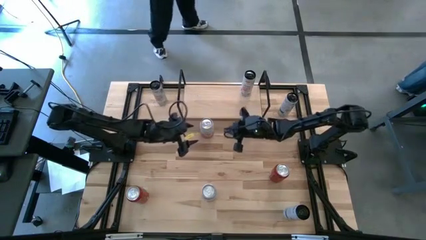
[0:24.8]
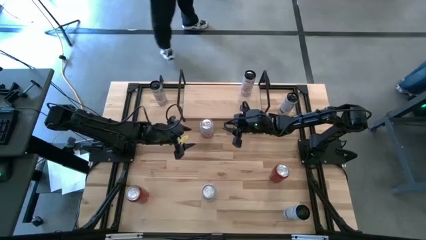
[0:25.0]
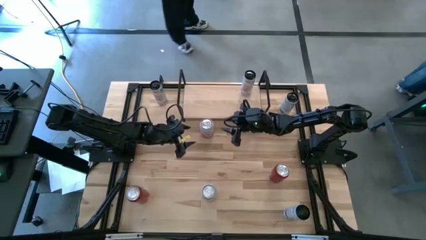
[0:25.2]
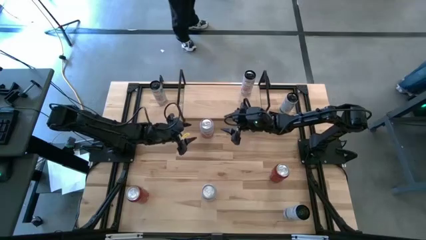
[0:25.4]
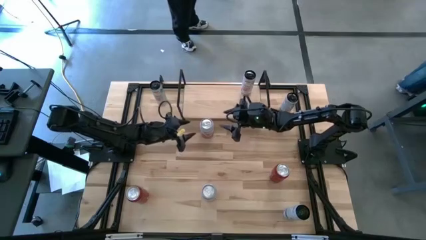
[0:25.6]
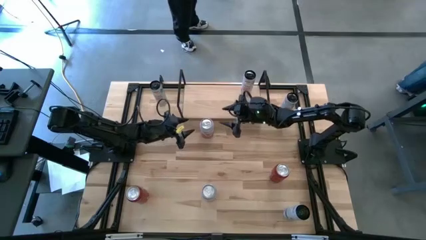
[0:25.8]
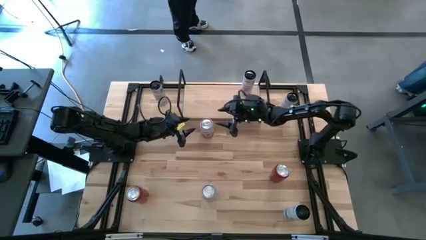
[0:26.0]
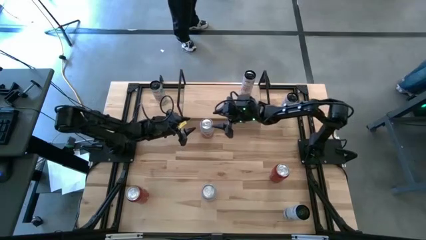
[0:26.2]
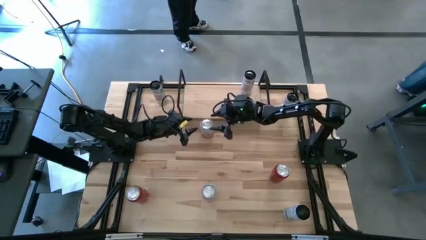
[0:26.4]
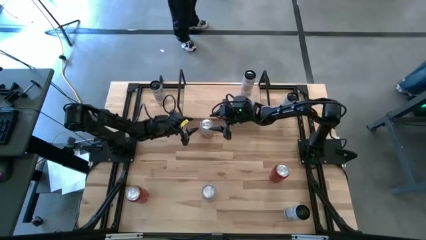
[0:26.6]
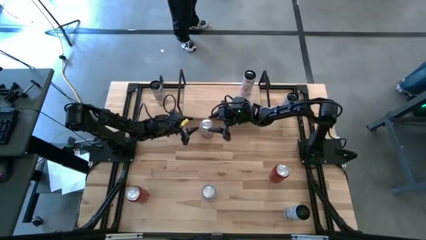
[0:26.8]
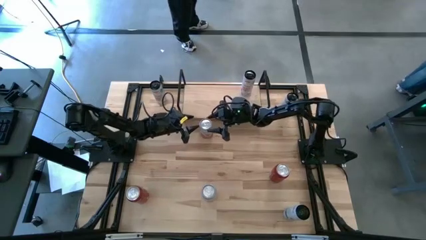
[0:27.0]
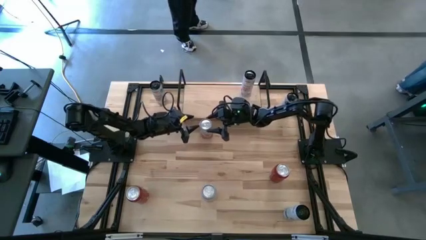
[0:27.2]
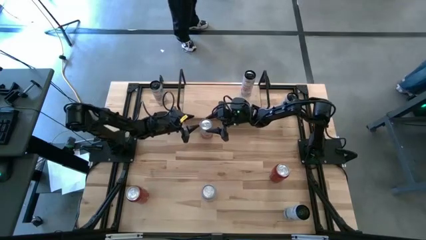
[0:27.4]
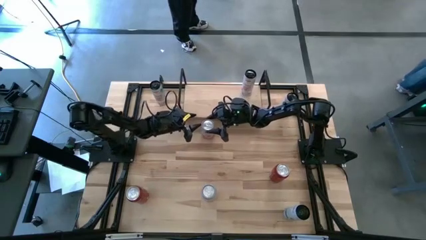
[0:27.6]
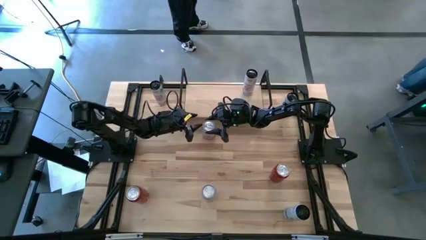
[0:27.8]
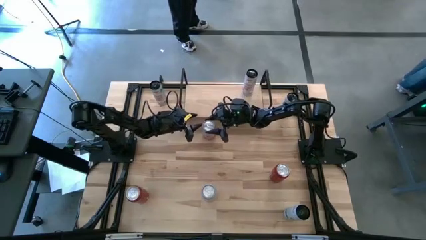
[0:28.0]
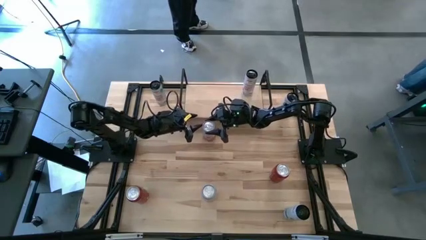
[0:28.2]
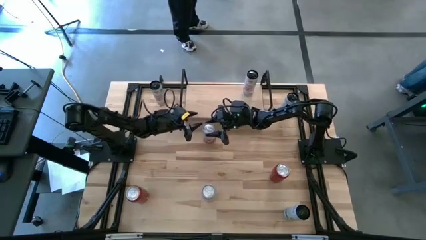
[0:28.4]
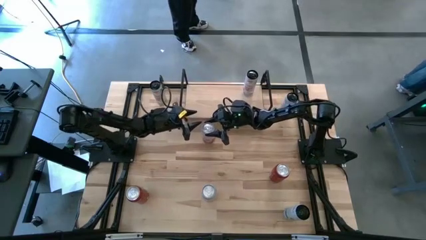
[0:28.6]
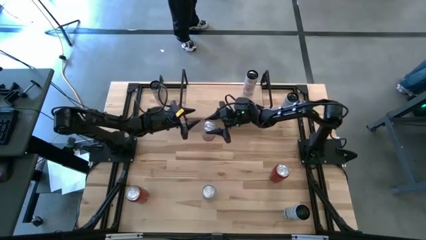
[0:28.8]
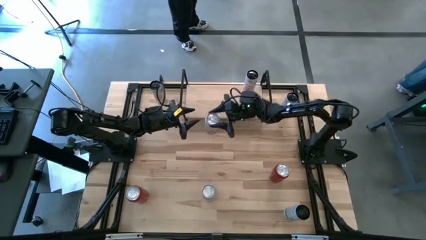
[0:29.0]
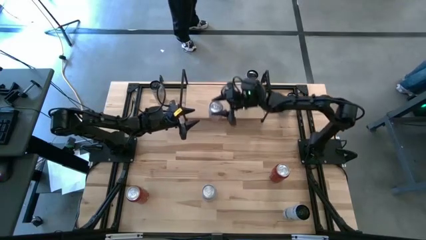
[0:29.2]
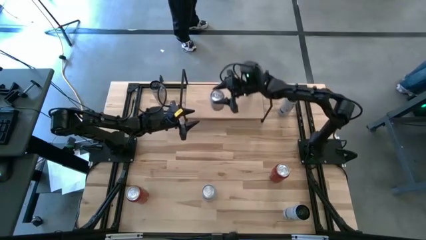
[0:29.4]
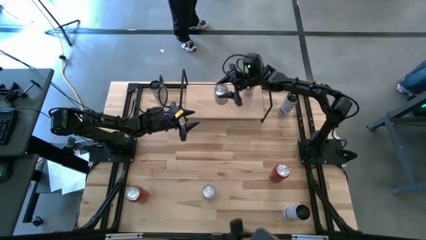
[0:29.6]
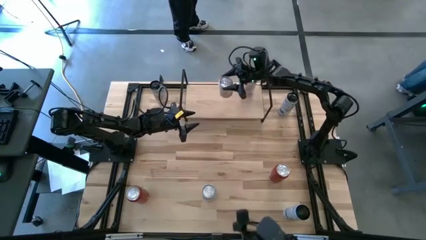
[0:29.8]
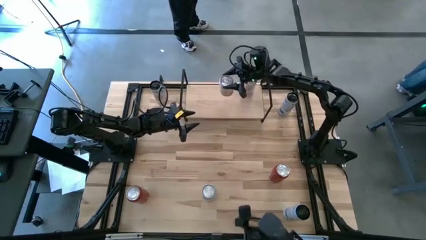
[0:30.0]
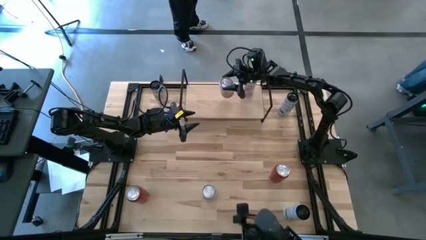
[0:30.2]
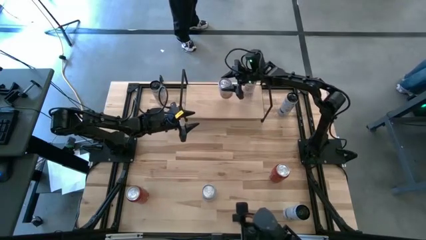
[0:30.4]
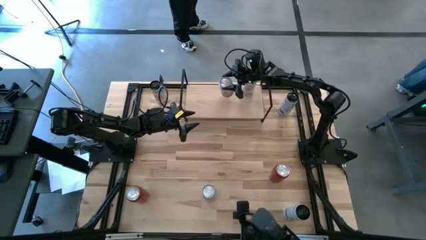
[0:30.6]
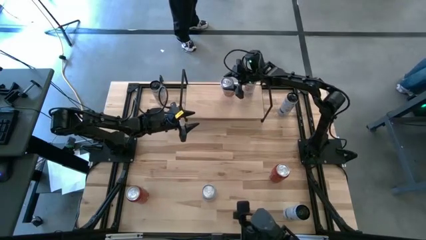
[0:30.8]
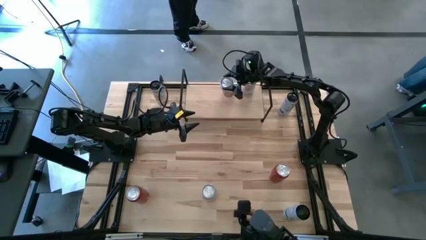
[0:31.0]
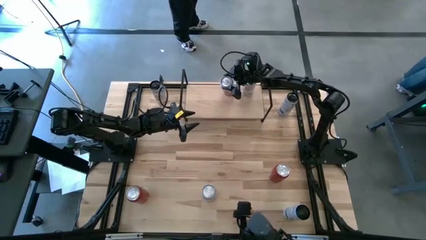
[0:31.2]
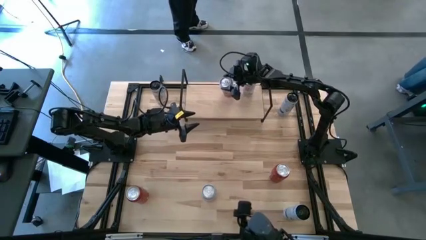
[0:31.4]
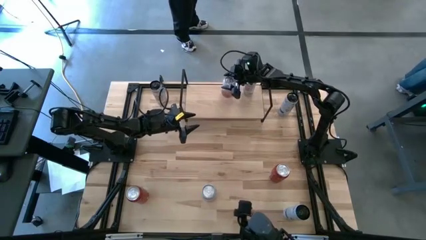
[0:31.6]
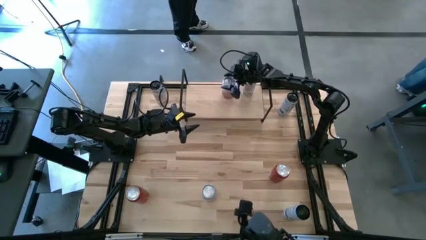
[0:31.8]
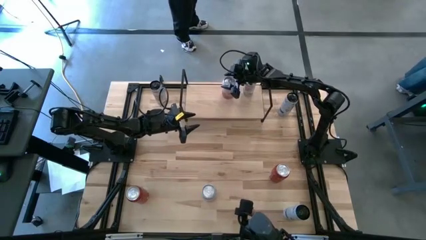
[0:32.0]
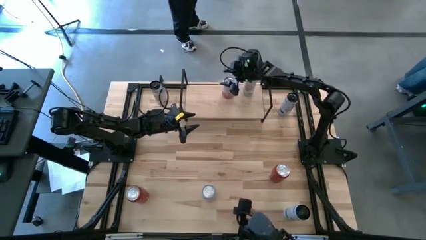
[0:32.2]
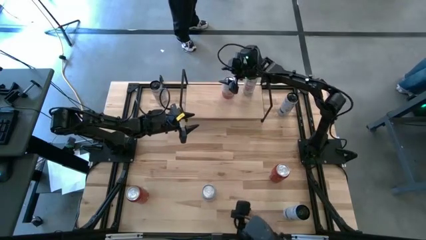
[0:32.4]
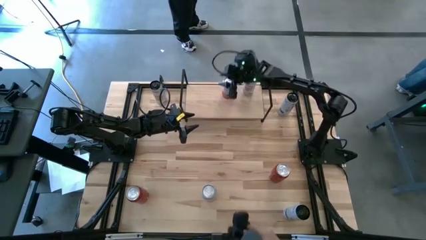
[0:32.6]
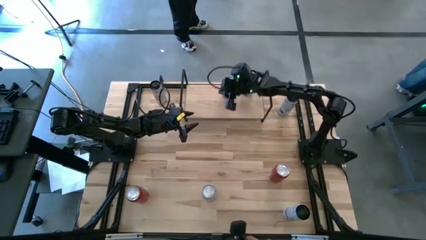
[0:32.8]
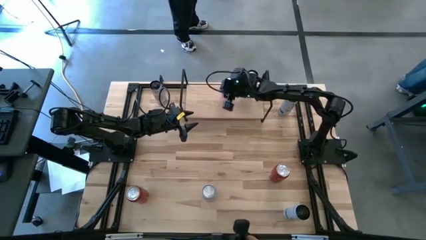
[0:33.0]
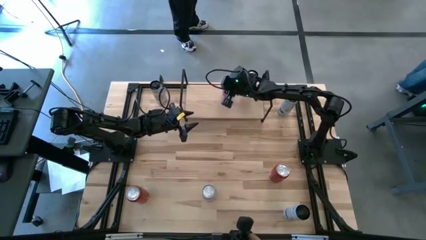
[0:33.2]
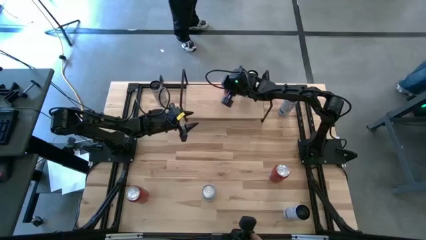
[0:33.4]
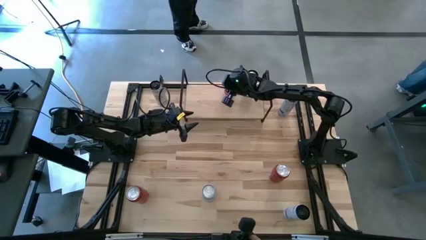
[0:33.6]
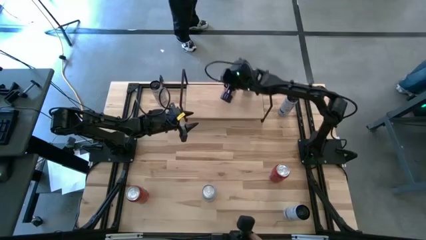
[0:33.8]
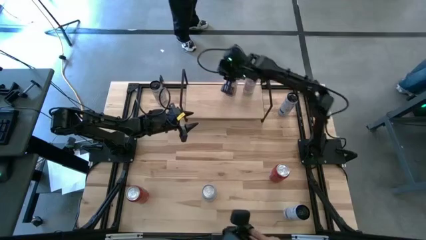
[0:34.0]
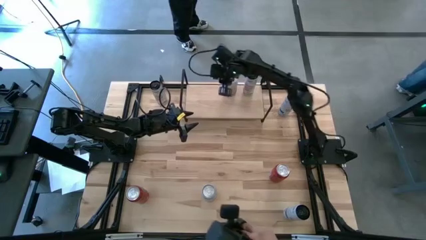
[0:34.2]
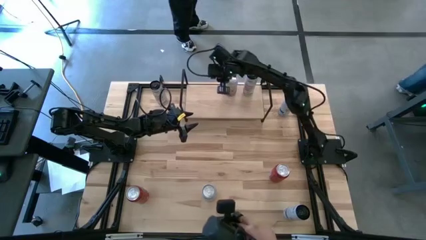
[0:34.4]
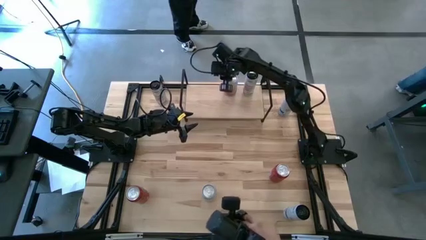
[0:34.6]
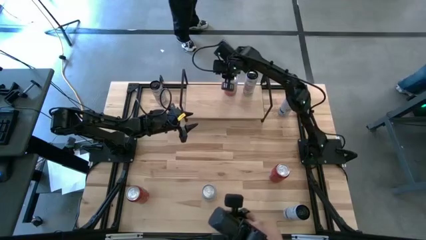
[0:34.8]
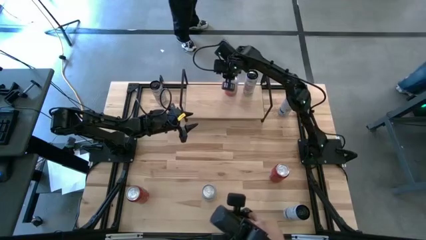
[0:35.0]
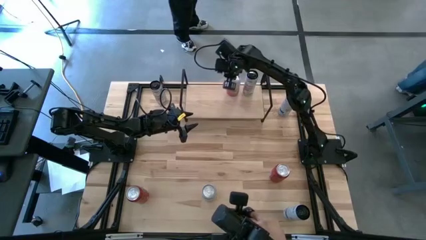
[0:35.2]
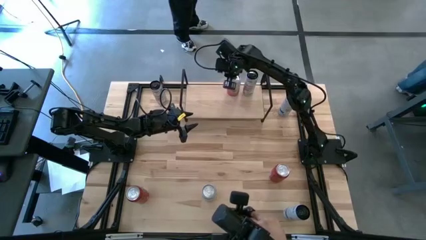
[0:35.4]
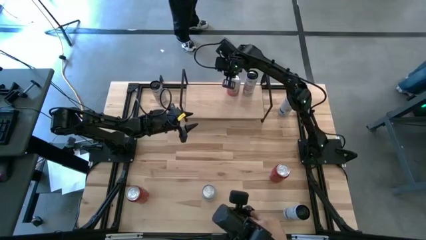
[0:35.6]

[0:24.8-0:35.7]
Task: Place canned beverage on shelf
Put the top pink and white soda can on the shelf

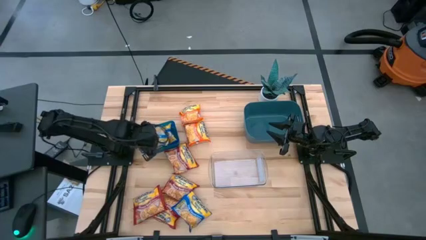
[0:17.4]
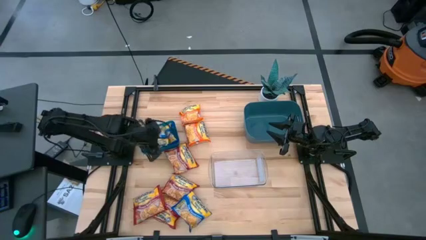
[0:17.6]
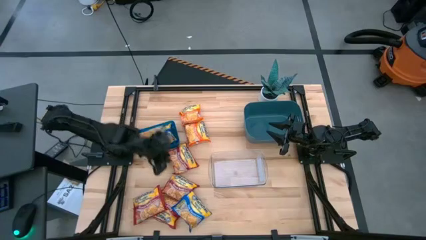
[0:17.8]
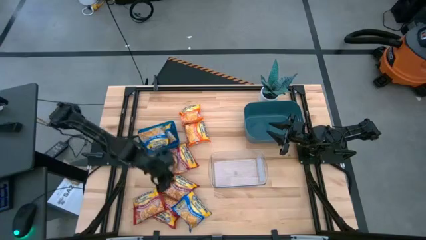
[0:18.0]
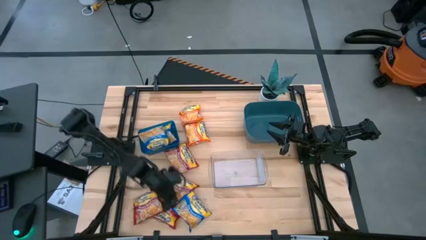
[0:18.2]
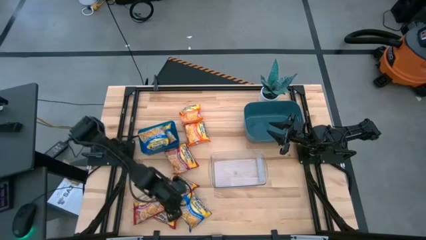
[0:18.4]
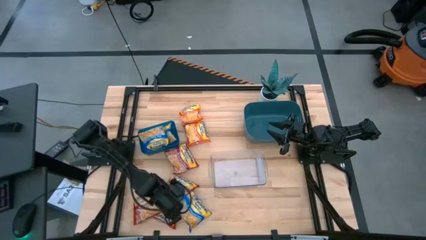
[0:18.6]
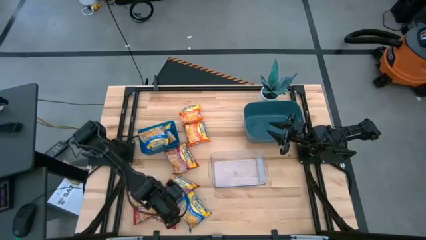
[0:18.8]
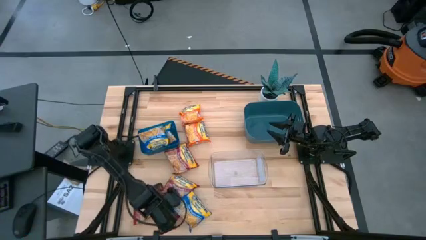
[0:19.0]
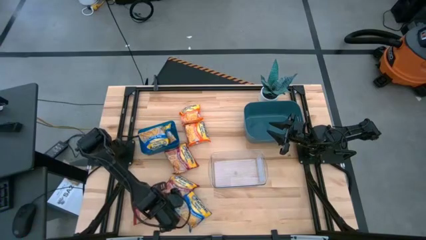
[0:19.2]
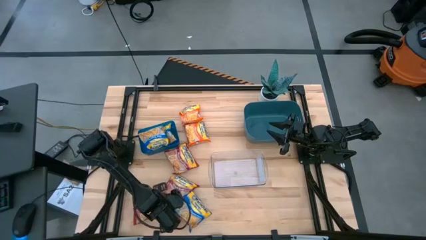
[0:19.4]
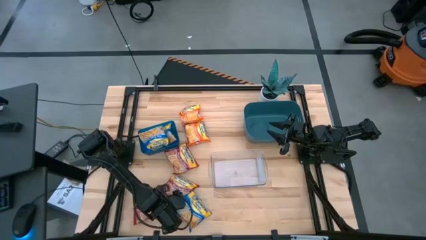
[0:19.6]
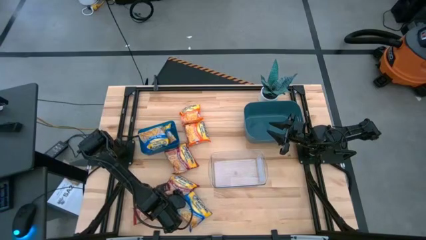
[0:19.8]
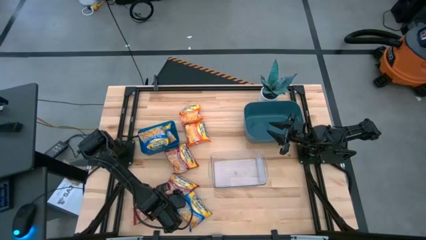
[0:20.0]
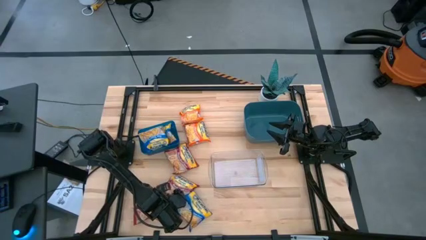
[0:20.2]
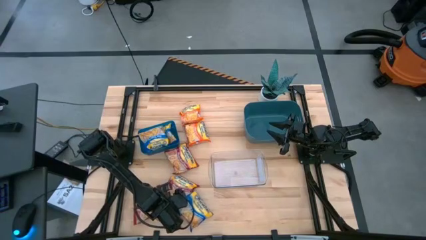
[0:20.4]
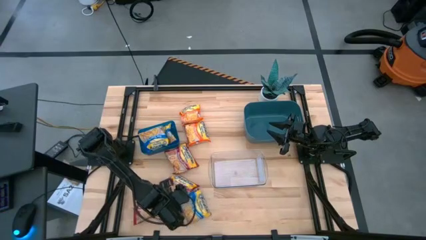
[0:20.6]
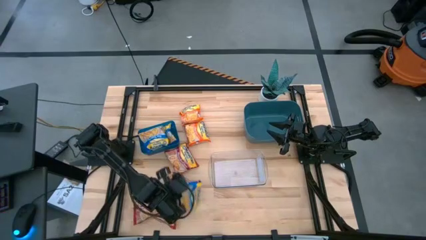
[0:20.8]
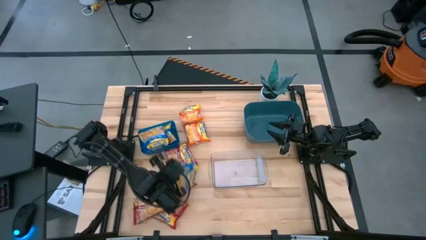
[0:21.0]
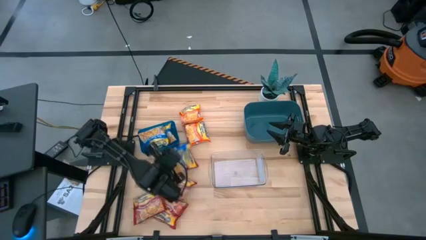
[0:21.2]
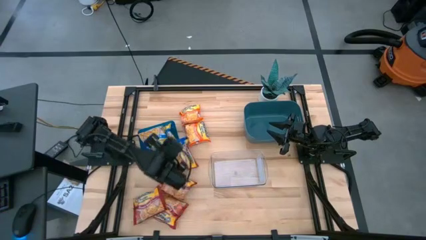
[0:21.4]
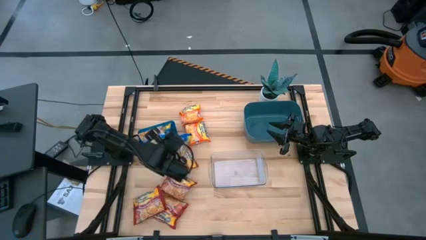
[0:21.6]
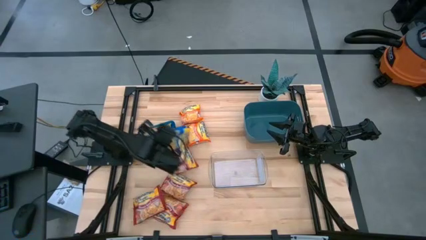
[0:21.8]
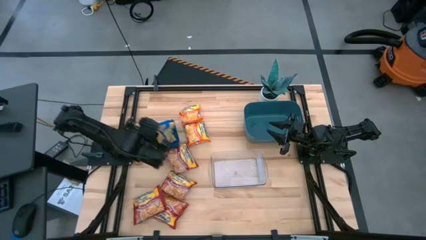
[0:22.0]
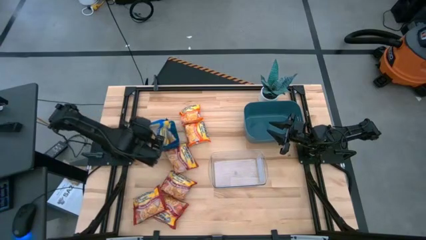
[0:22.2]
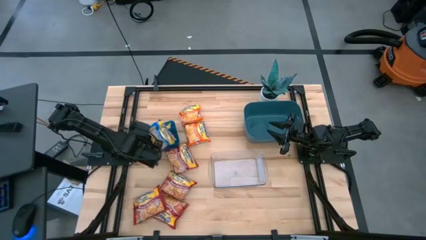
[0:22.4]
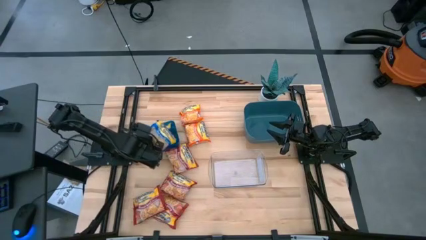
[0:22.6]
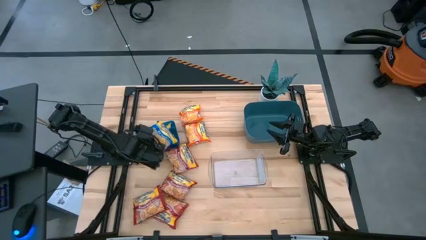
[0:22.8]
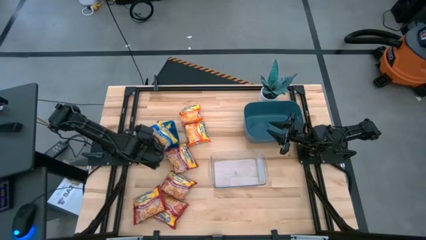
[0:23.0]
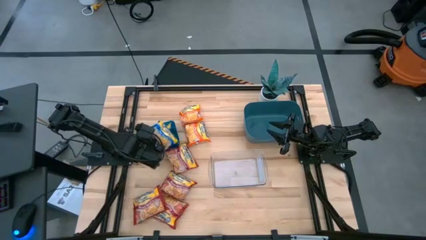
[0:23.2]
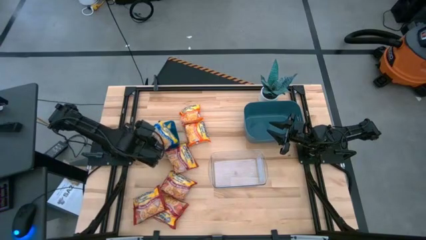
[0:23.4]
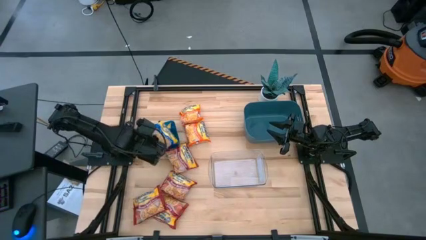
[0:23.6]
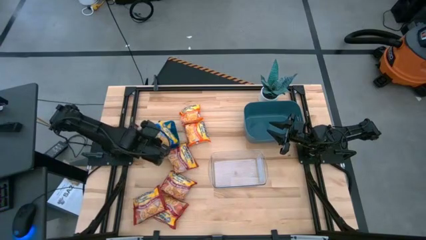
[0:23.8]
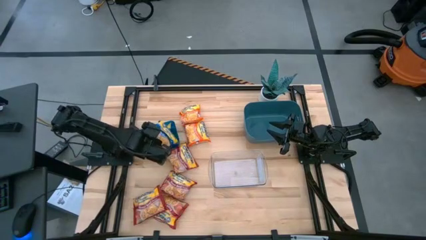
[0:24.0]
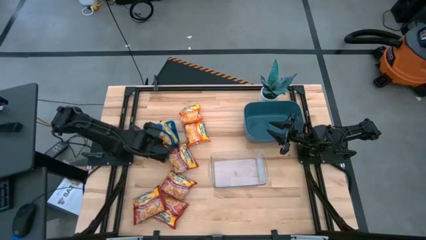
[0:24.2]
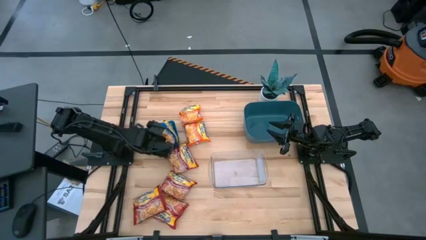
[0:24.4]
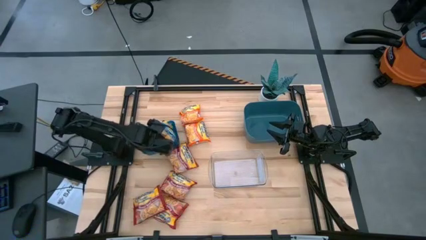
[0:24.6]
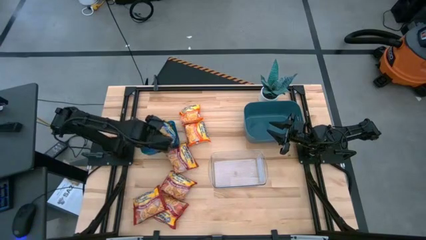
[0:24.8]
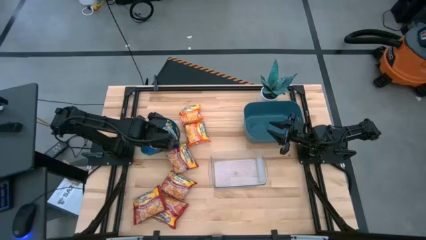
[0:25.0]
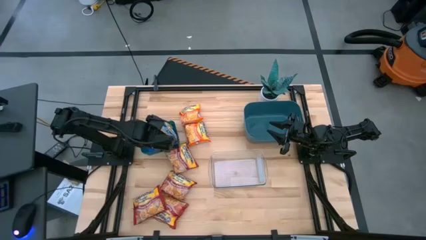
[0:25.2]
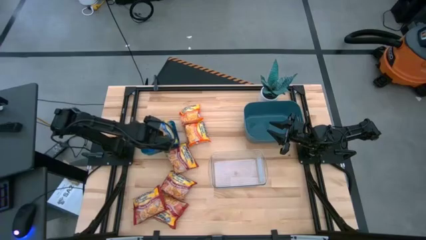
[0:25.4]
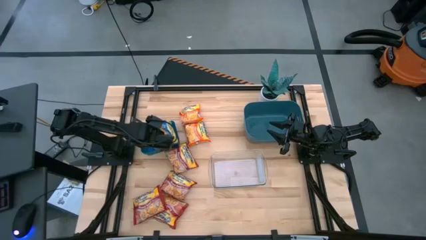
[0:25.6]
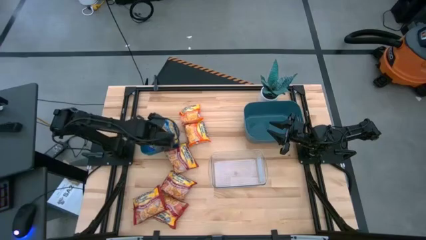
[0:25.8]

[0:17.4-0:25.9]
Task: Sort Maruchan noodles
Put the blue noodle pack into the blue bin
